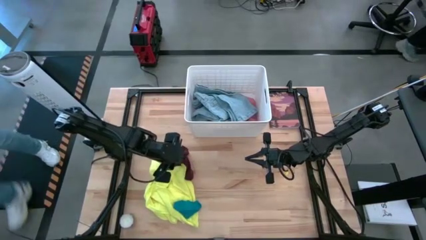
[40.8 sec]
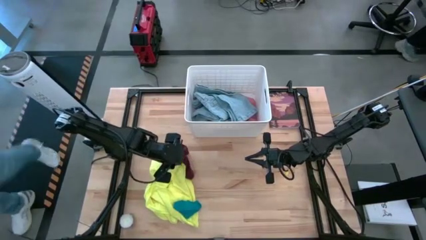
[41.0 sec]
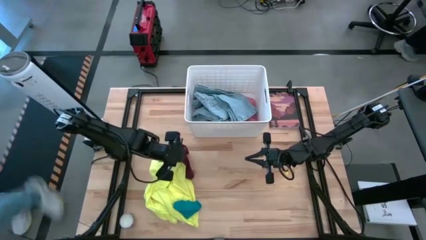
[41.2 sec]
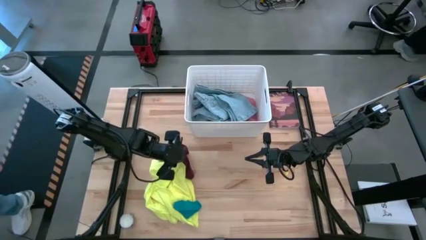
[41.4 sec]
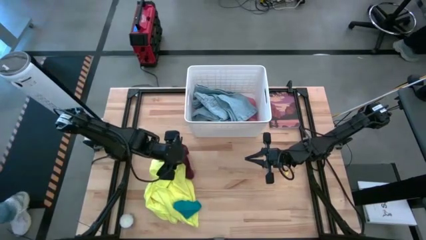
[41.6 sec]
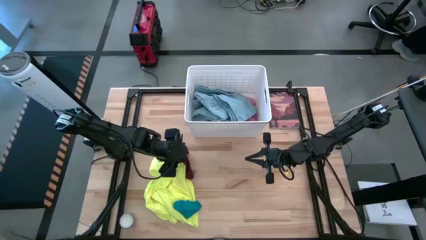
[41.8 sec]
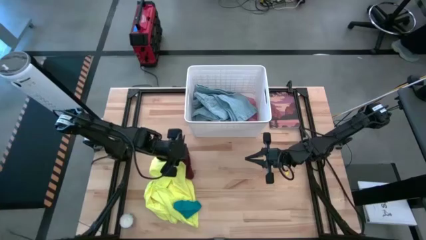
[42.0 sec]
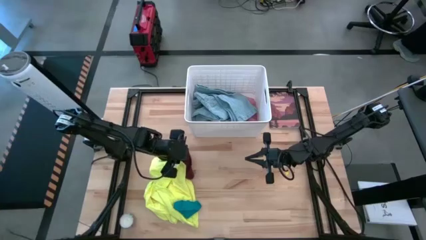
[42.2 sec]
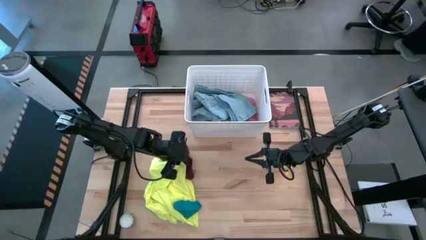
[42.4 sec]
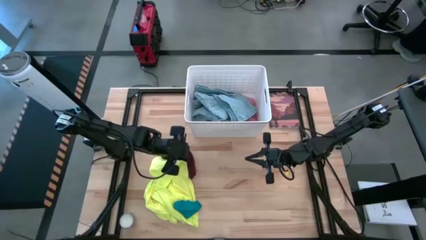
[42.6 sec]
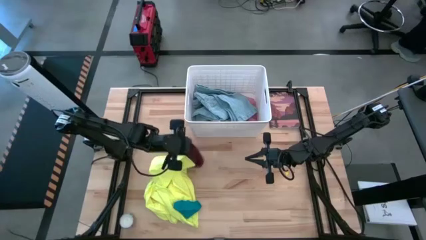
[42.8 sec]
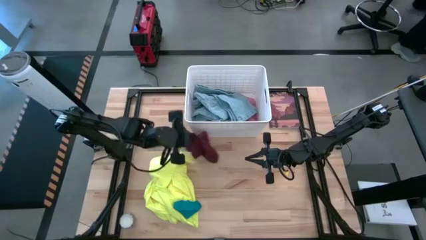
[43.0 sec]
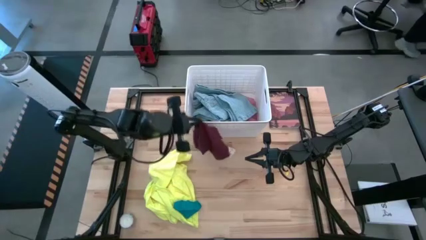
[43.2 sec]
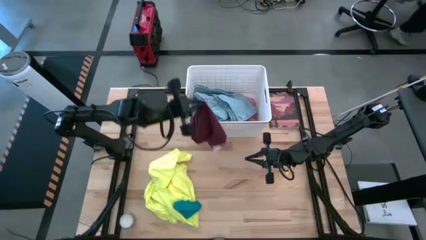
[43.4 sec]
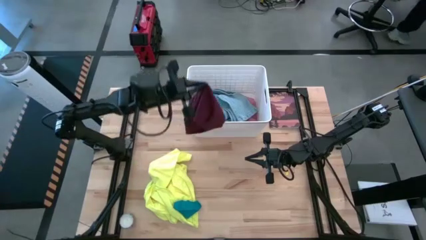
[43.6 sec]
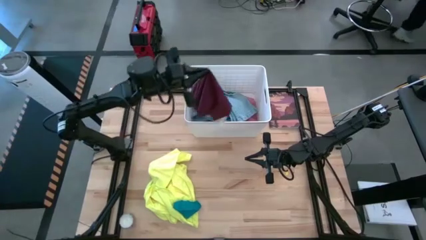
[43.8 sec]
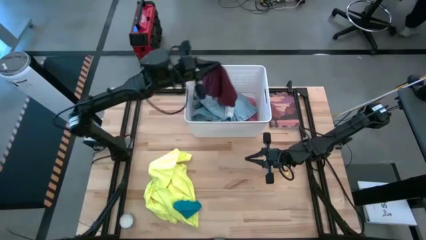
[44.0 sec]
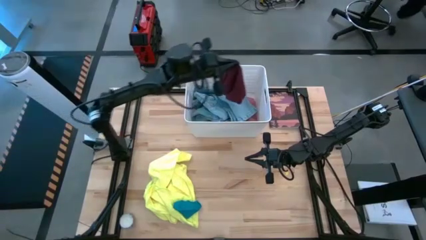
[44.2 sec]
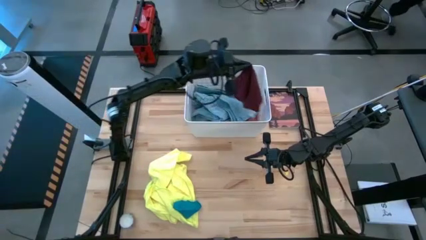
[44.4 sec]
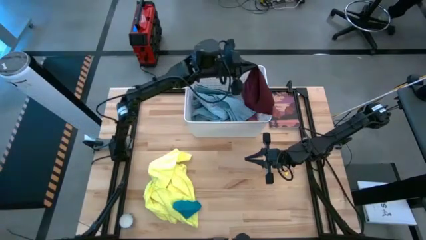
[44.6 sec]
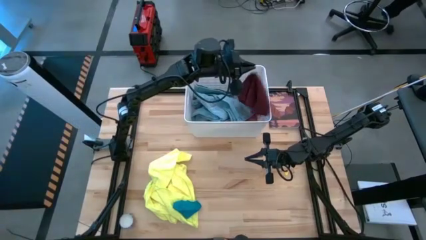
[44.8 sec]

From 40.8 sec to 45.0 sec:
Task: Sort clothes
Put the red underwear into the white laundry bin

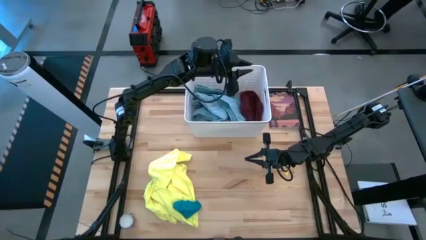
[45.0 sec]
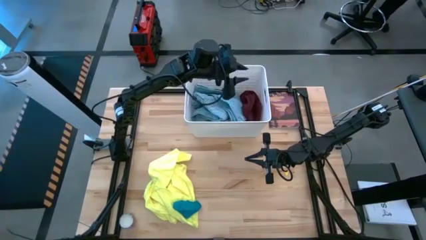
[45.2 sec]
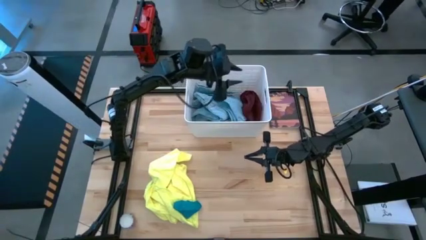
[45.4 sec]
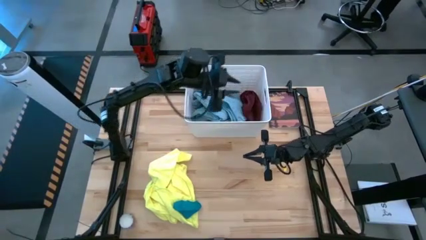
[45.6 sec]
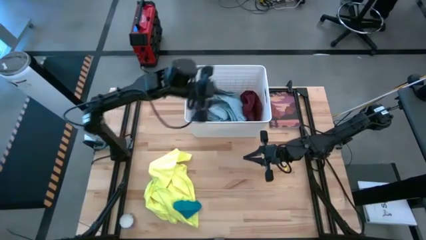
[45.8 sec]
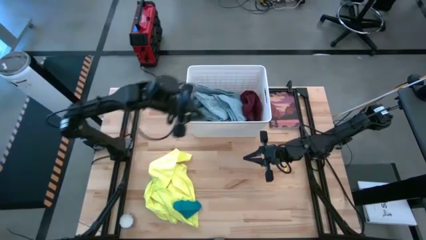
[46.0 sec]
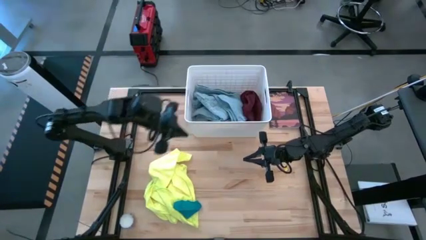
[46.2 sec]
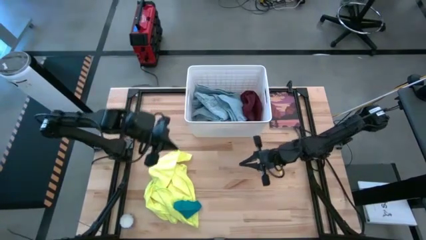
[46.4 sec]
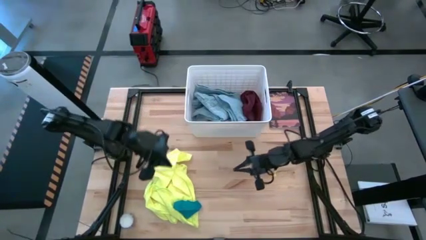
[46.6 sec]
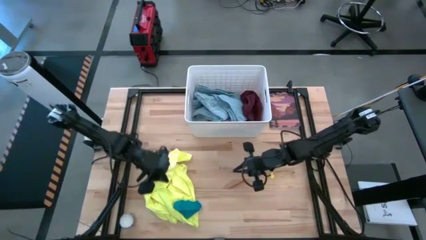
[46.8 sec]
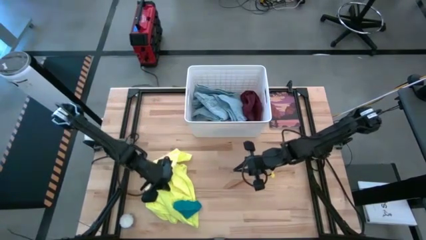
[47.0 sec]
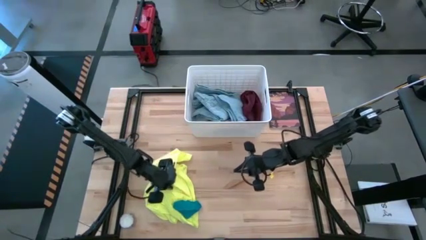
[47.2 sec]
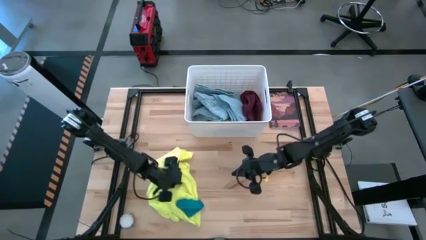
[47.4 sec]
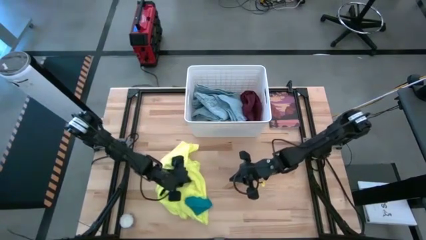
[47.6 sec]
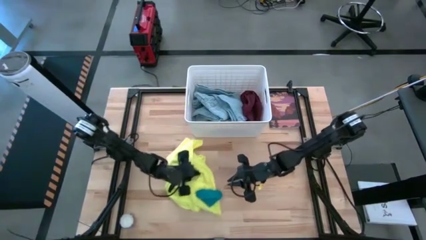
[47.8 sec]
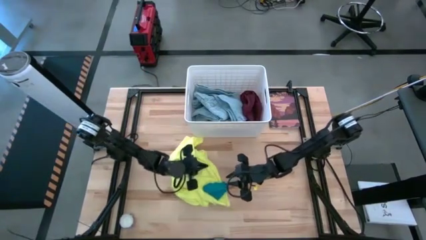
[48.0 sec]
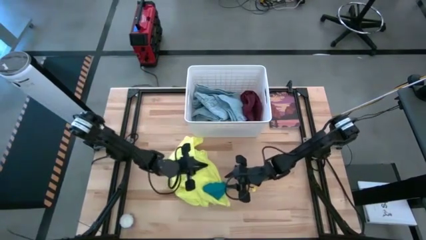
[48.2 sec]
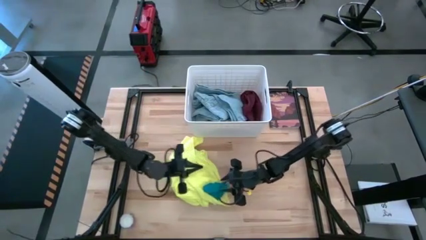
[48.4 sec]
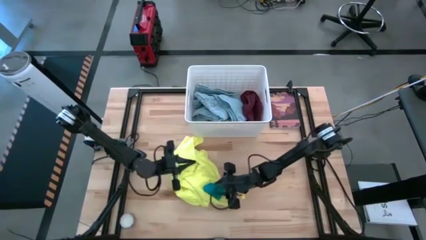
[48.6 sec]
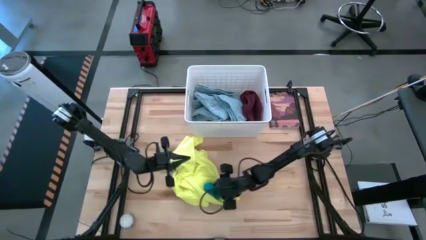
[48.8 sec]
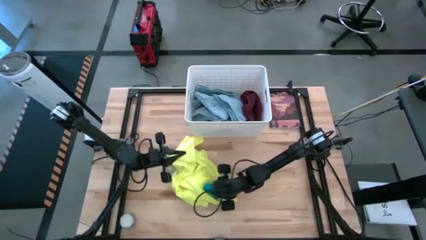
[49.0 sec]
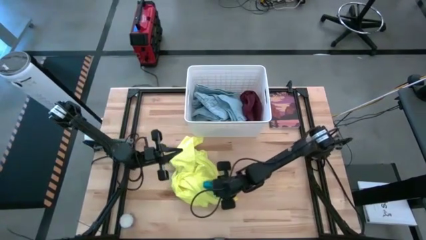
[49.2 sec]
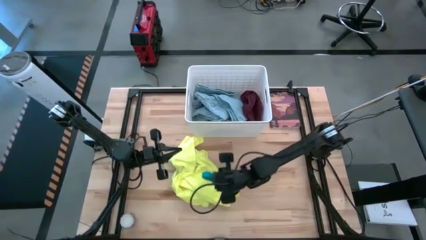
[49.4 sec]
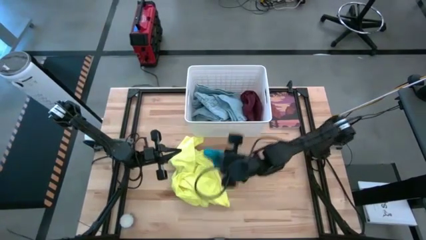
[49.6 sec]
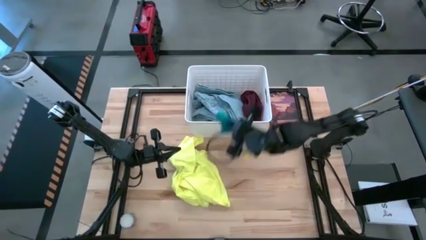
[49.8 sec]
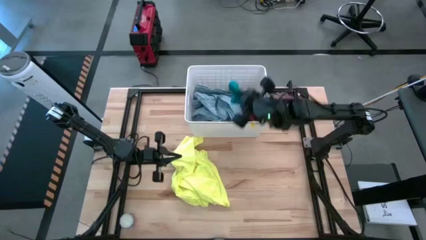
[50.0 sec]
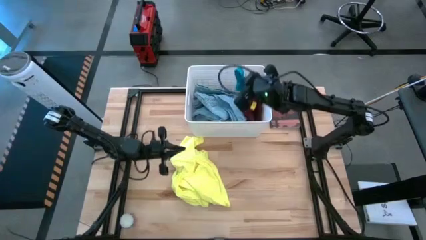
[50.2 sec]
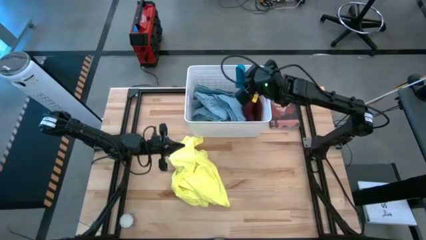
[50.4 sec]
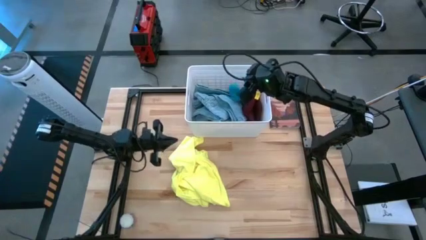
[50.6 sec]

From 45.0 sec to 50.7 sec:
Put the blue sock into the white laundry bin

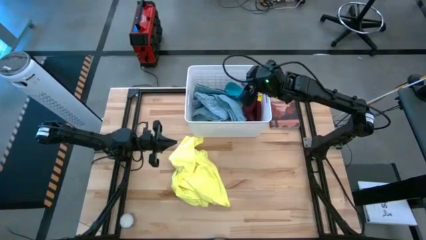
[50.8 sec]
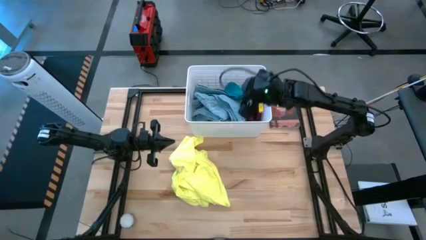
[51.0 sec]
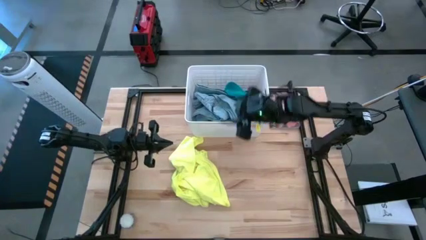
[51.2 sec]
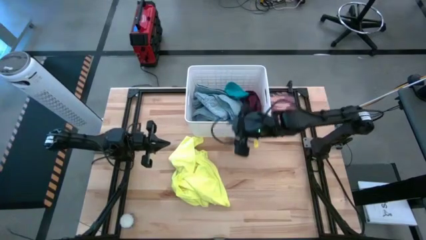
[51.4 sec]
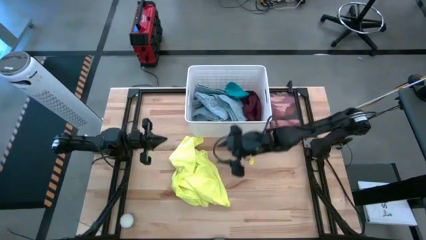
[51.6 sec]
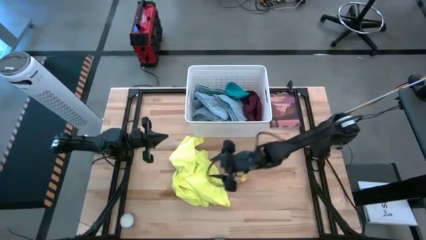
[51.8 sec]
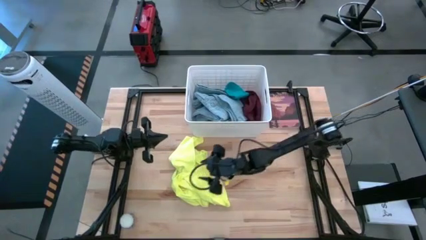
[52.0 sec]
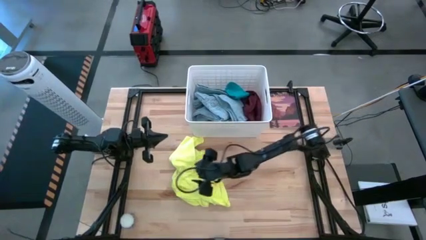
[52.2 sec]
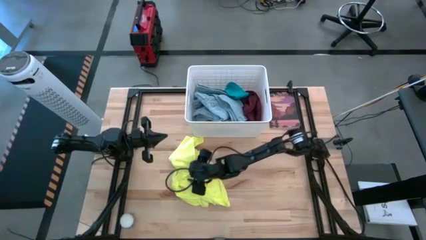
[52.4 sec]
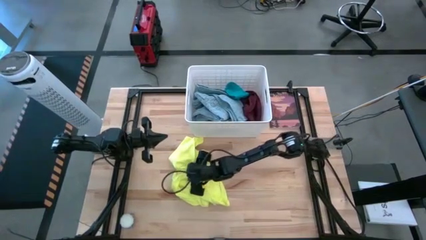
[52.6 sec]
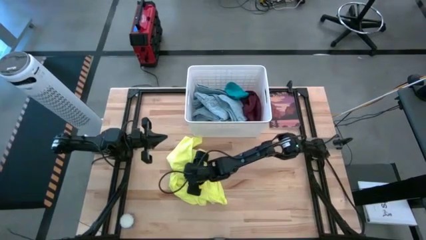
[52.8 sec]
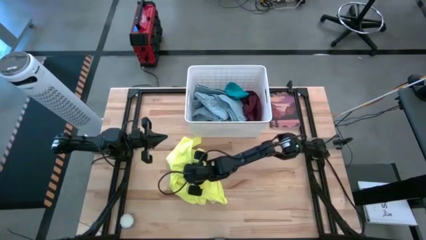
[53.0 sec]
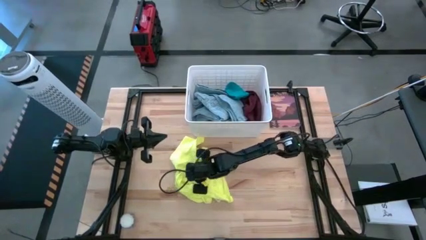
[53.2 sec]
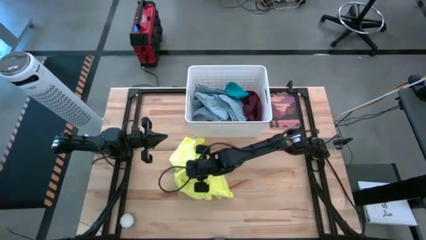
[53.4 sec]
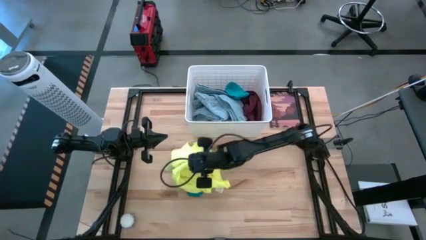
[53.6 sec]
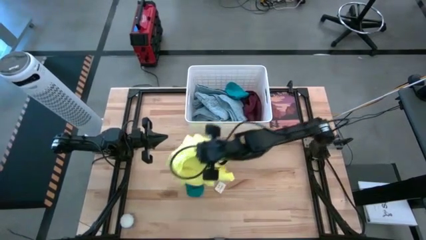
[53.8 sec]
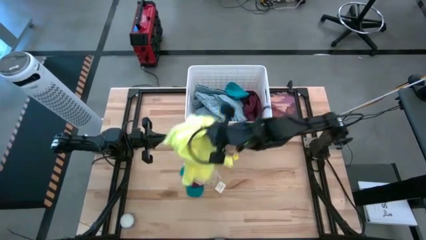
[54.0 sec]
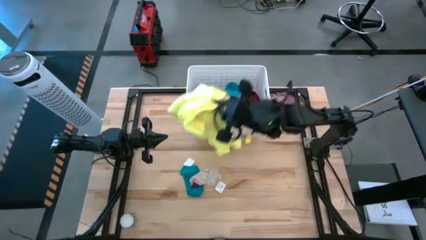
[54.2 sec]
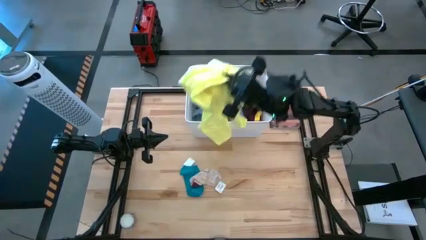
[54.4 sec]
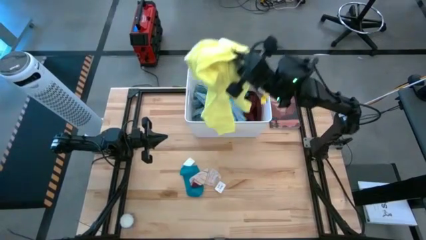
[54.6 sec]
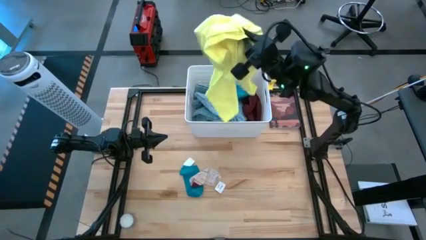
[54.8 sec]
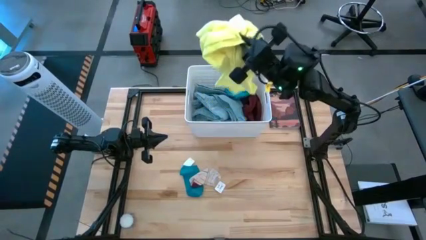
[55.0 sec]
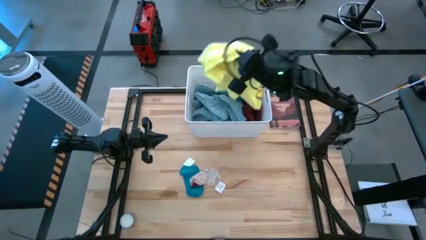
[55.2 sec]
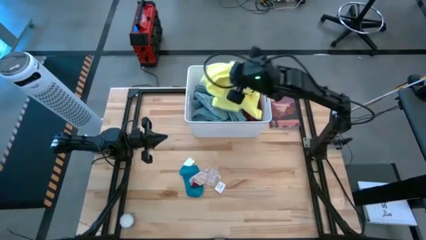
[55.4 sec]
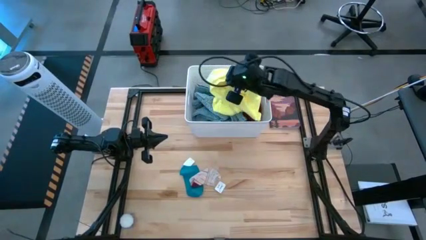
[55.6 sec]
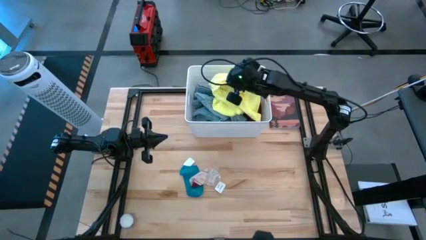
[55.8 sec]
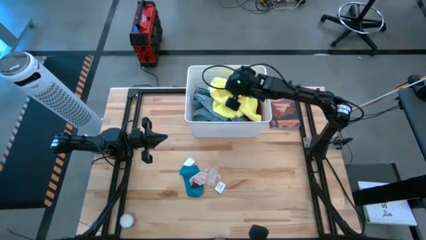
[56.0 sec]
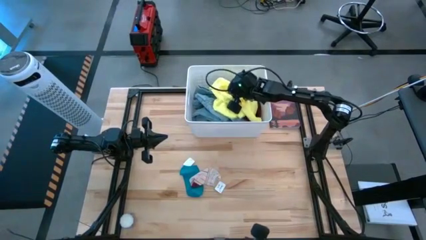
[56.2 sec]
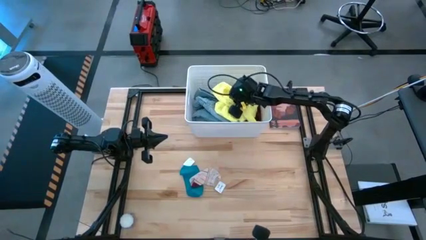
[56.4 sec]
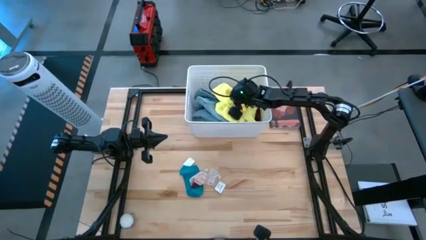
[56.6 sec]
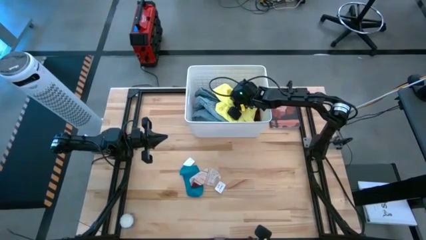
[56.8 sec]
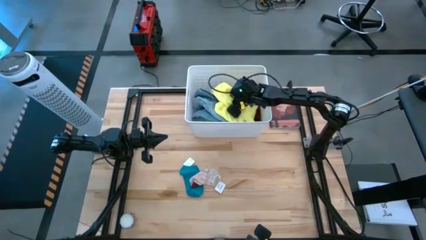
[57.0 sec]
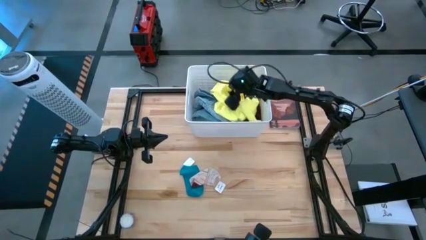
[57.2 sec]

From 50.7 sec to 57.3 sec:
Put the yellow shirt into the white laundry bin

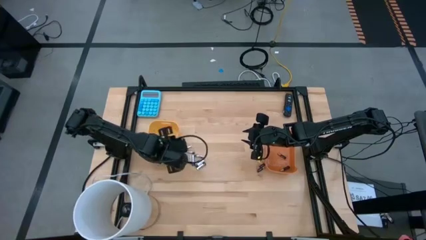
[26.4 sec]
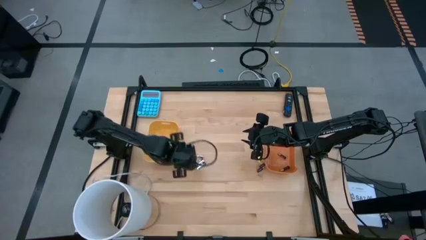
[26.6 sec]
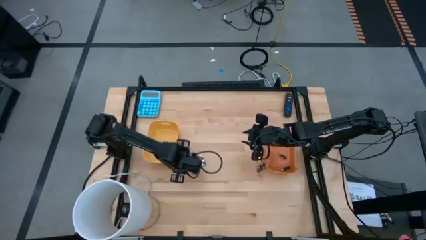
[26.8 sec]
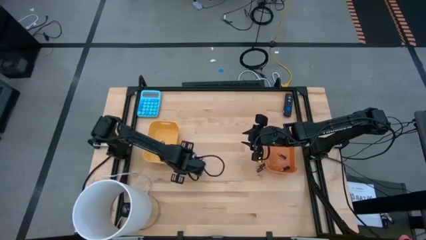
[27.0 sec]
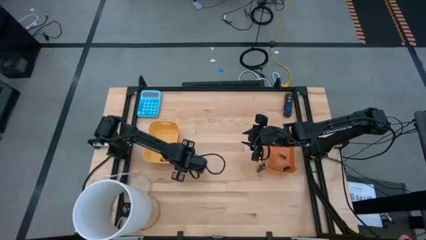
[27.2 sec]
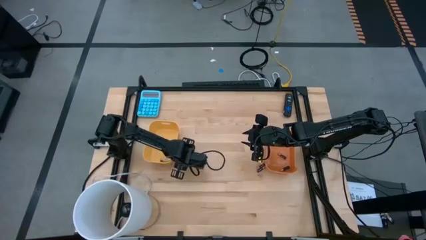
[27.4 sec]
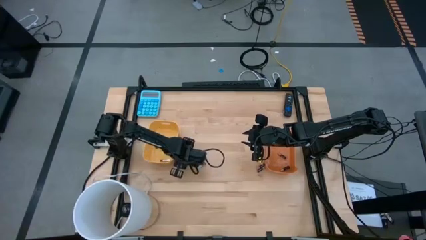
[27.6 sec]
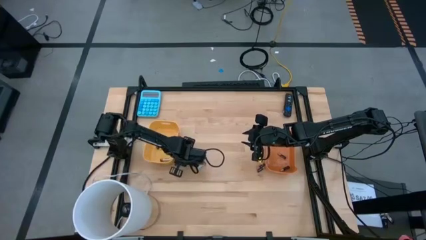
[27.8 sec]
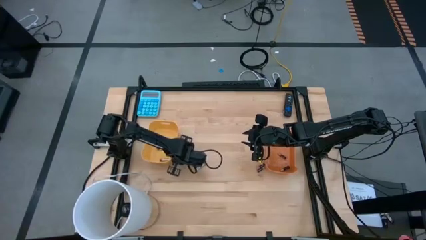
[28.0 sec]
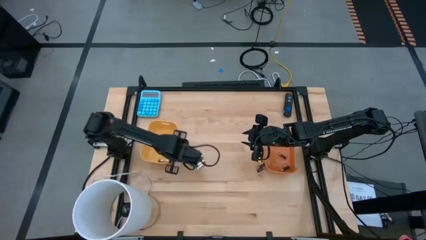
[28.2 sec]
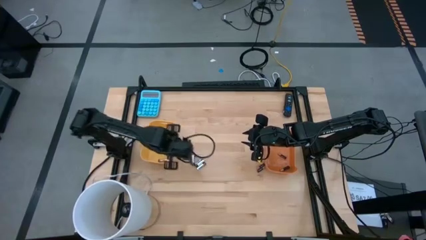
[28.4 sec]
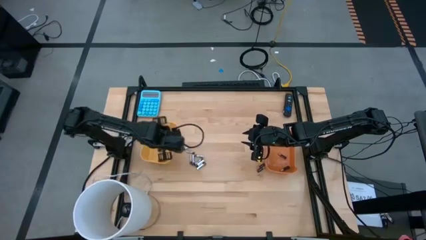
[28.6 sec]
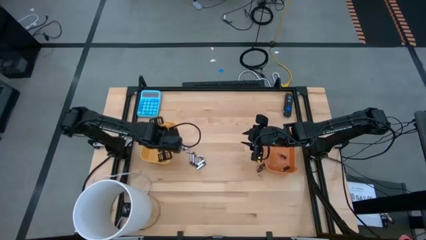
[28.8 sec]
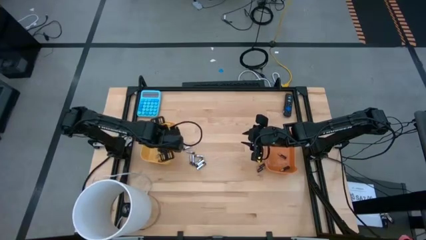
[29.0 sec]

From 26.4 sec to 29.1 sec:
Task: Sort batteries
Put the silver battery into the yellow bin
